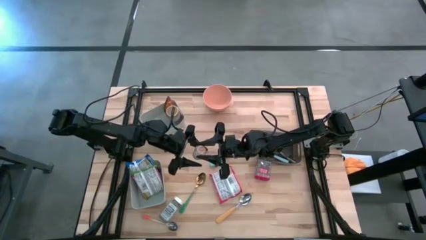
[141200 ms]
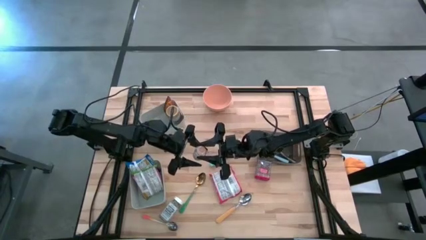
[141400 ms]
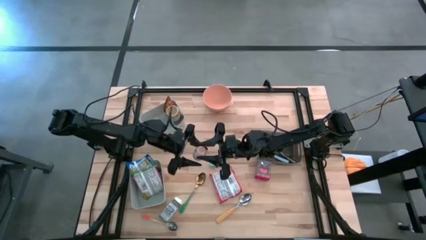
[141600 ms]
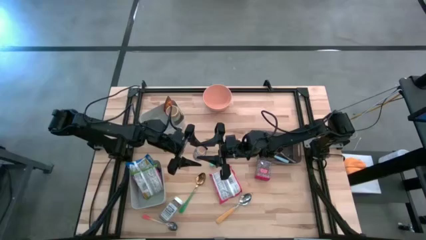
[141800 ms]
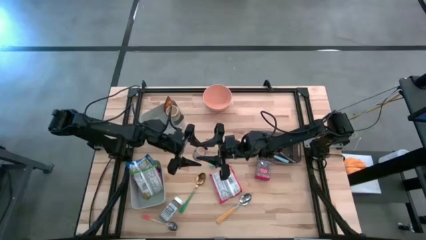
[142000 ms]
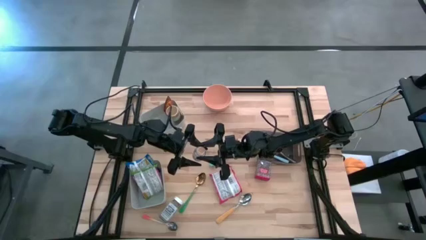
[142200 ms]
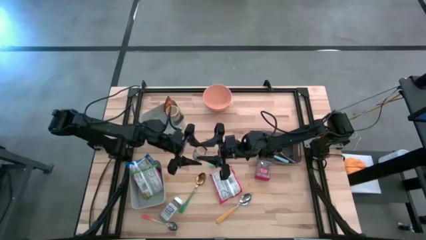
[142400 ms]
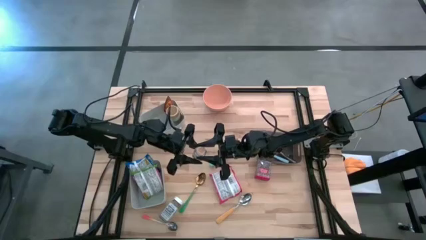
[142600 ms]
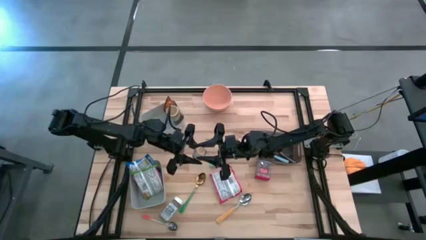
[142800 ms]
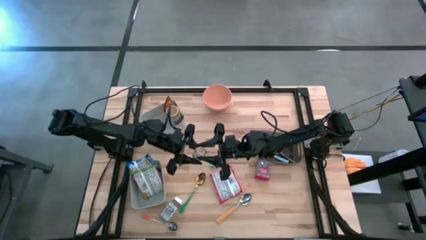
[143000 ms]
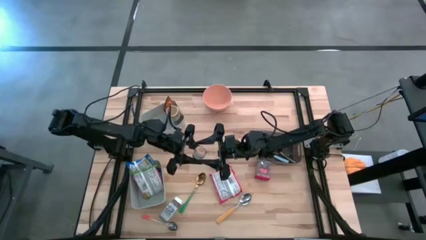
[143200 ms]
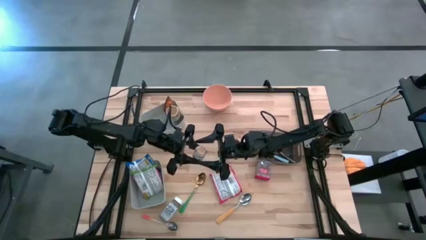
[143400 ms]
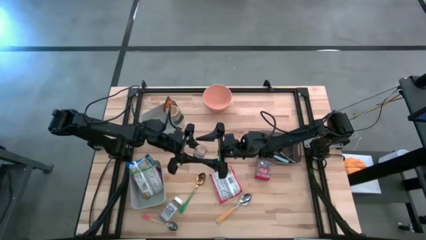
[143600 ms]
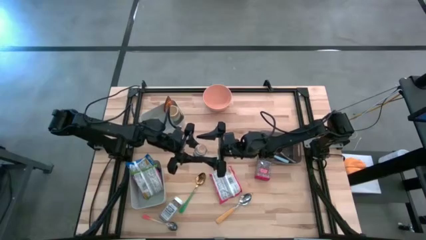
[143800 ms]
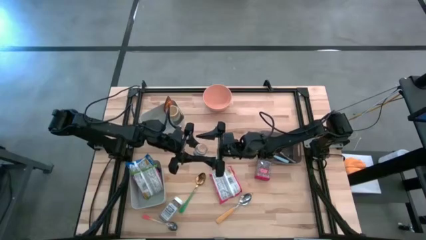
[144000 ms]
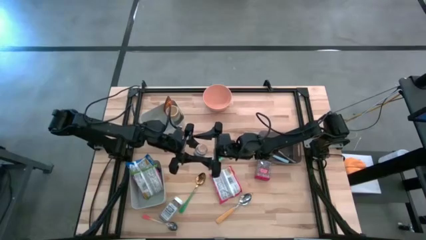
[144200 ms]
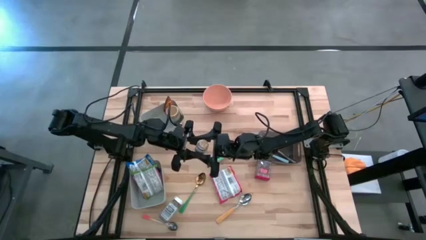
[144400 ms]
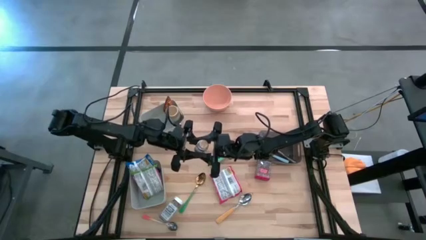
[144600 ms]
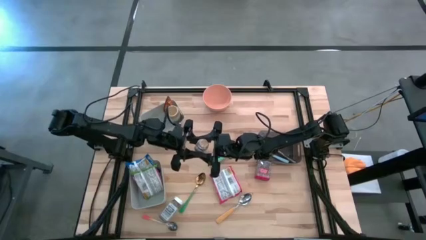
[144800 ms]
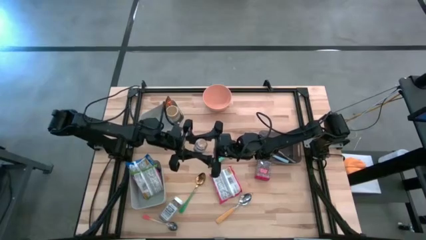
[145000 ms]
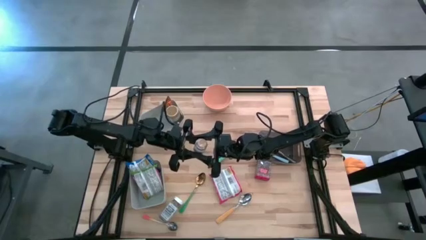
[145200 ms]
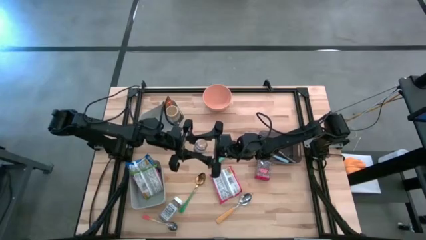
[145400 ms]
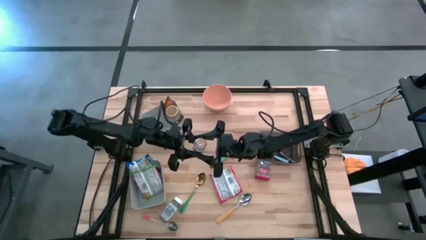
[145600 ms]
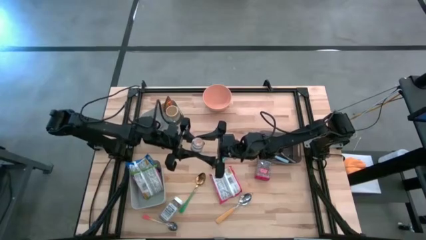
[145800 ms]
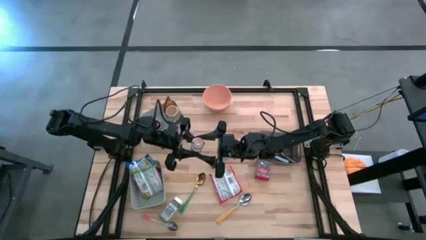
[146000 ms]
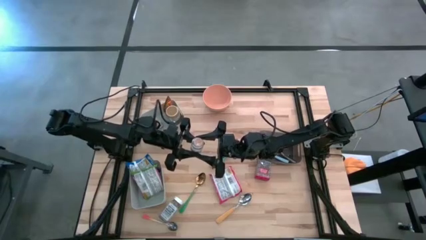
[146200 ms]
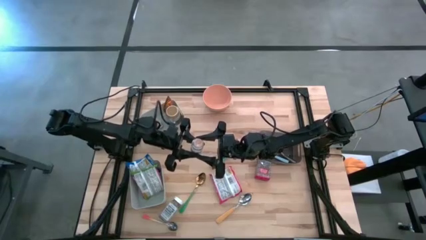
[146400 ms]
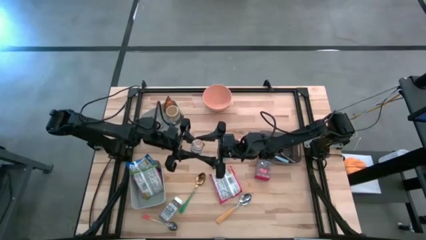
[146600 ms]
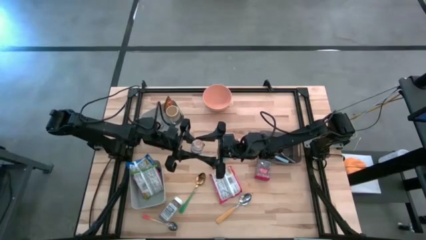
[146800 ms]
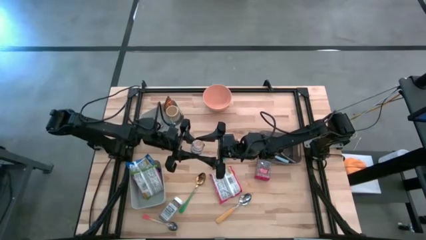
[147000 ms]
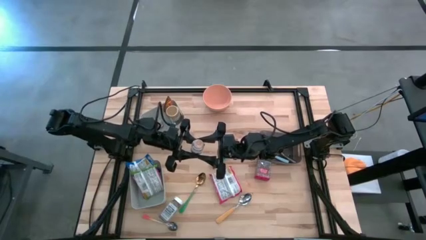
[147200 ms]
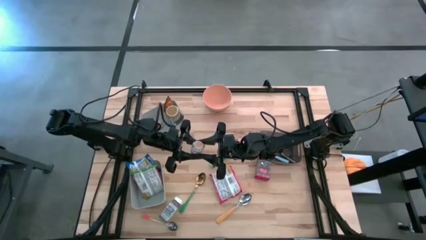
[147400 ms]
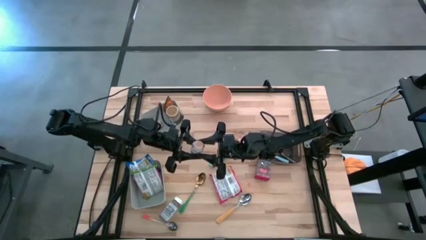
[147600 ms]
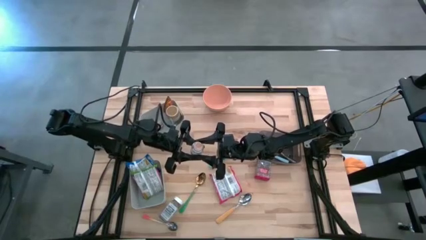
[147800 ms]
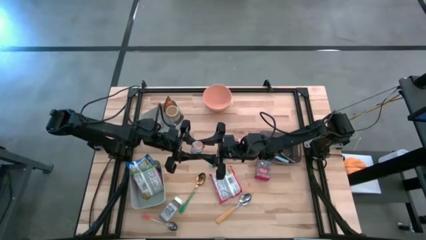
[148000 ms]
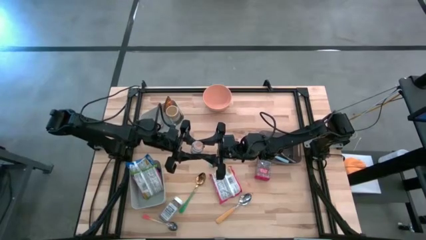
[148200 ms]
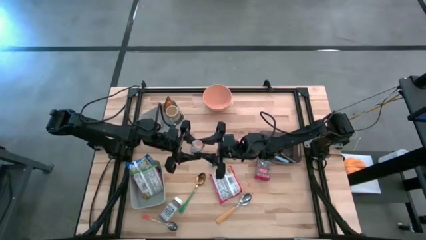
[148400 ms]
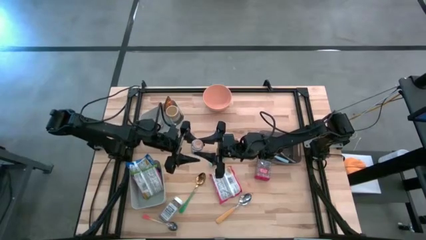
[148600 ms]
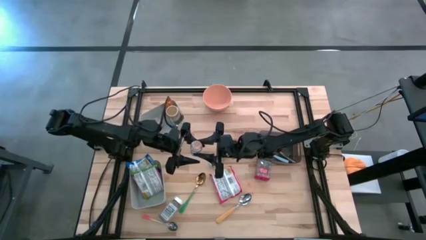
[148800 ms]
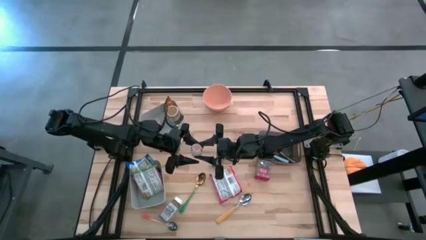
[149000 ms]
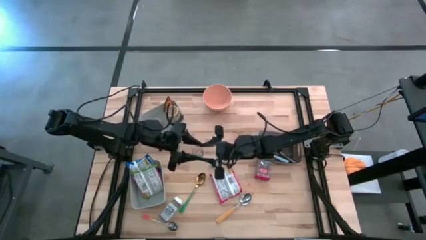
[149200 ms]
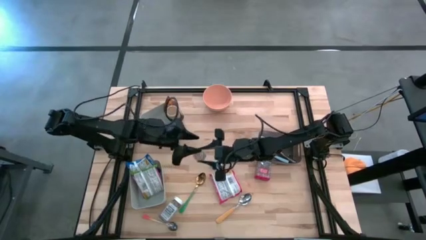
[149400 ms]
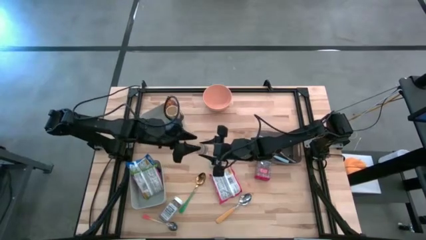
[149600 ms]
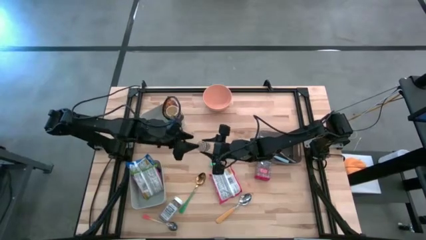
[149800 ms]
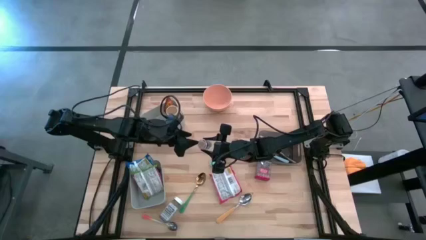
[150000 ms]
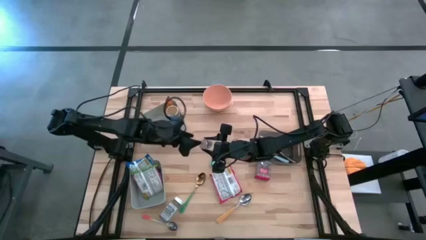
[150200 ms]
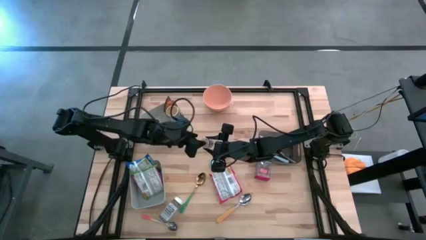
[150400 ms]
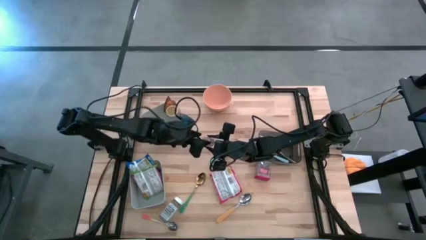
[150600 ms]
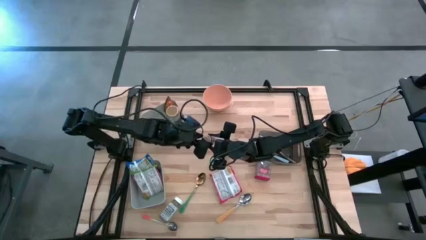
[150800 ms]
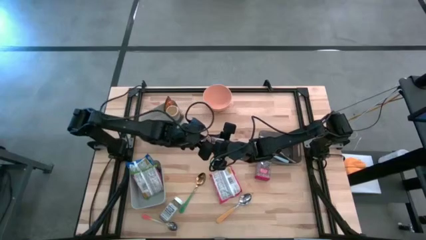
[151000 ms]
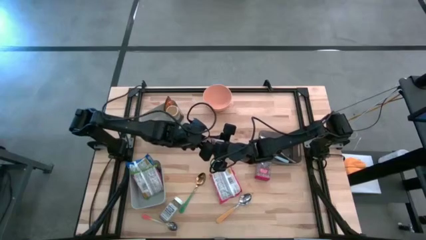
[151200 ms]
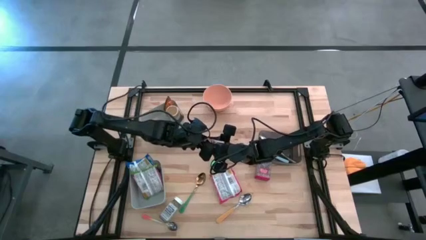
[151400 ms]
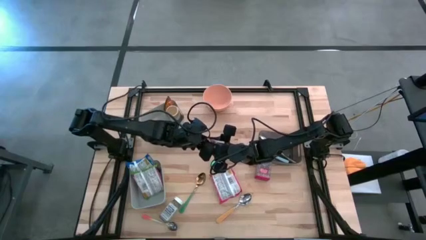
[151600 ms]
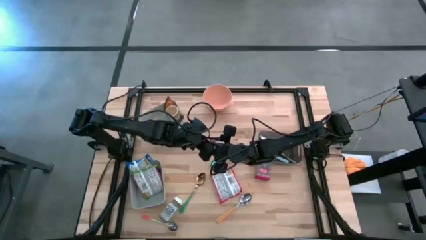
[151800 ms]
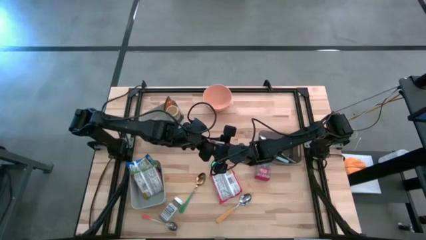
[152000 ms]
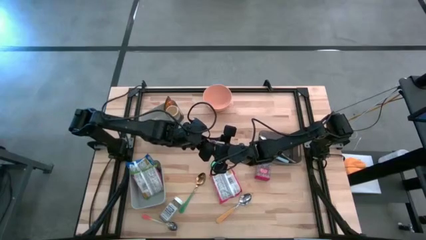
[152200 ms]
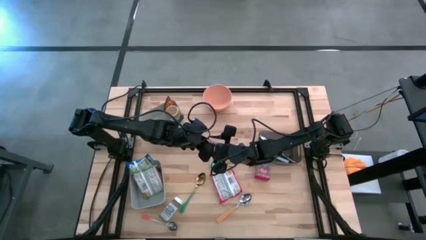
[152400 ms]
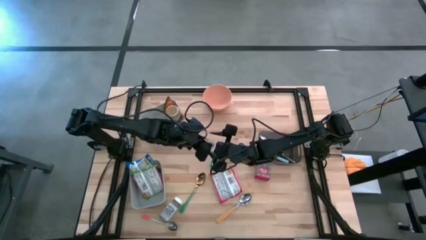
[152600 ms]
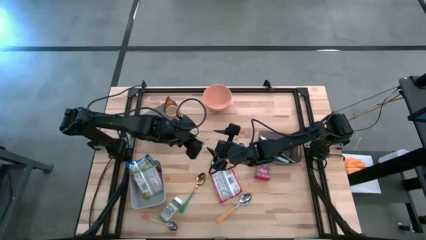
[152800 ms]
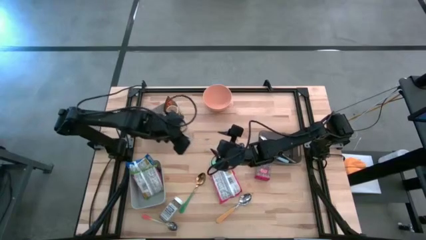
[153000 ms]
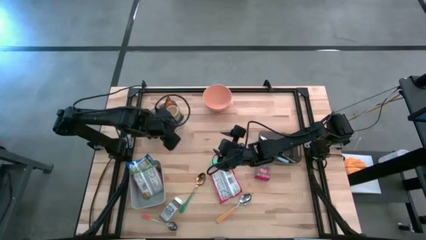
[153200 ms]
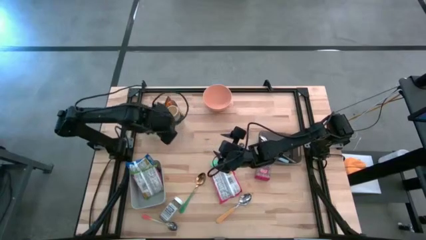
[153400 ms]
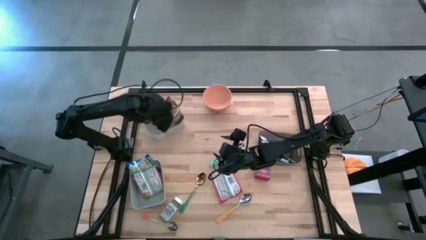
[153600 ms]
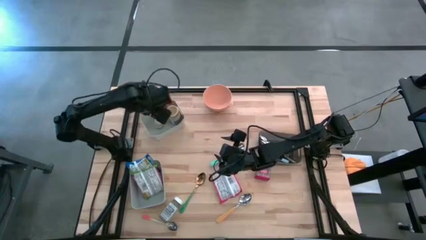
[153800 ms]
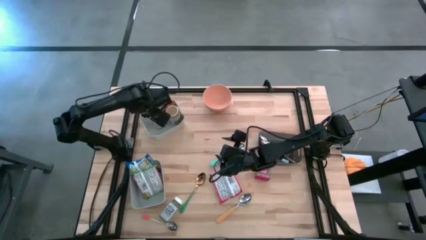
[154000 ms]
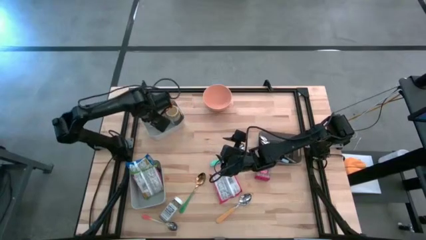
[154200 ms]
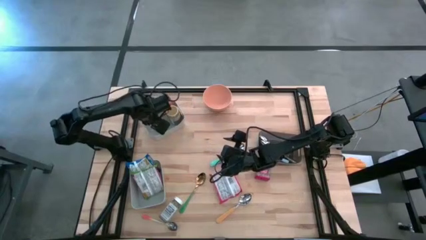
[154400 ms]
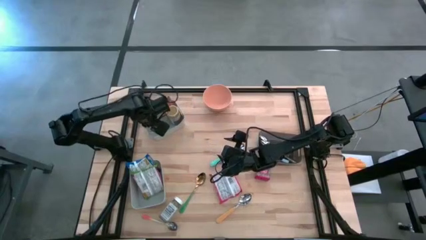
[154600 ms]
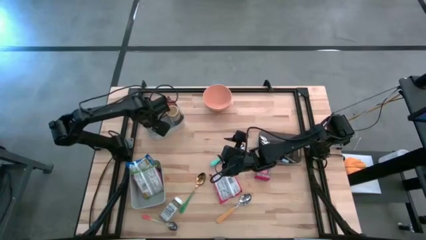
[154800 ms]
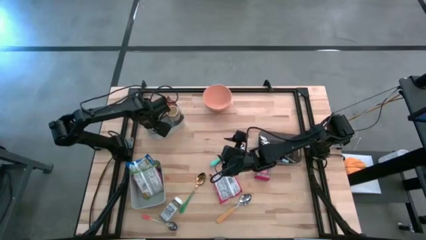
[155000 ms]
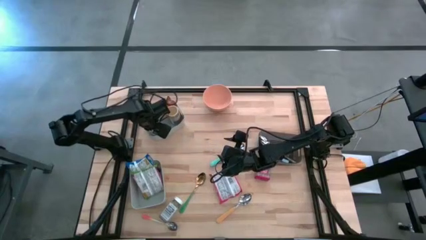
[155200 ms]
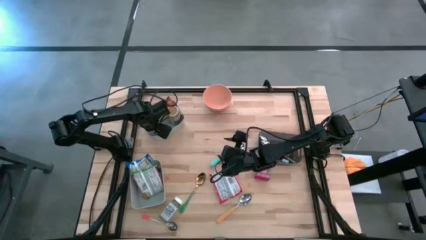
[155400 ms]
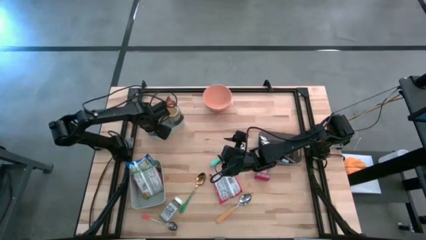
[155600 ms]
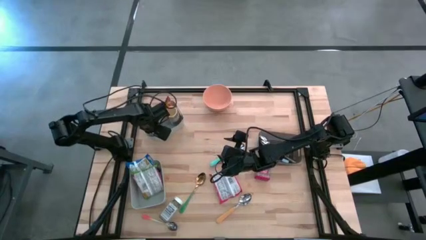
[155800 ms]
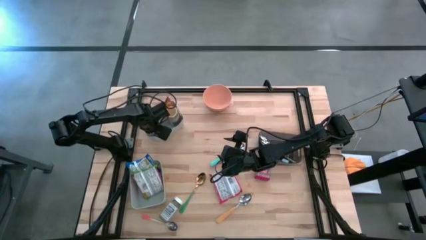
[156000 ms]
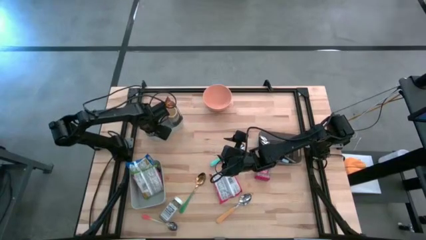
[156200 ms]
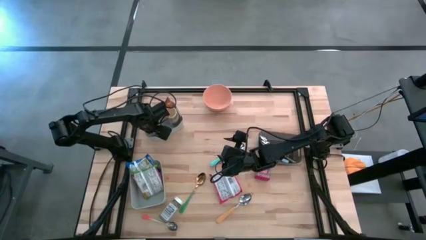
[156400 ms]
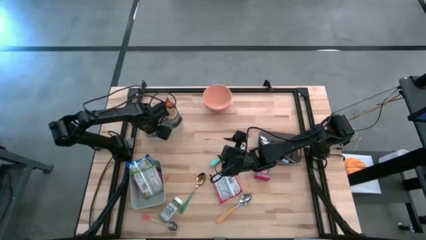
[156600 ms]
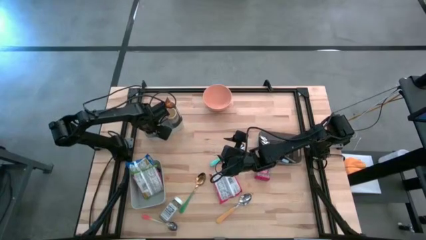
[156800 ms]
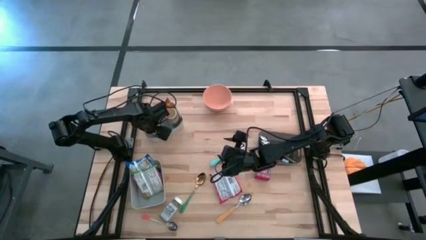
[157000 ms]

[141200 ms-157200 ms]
Put the brown seasoning bottle into the top gray bin
